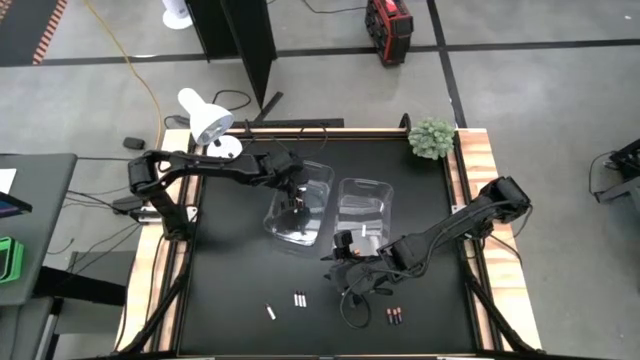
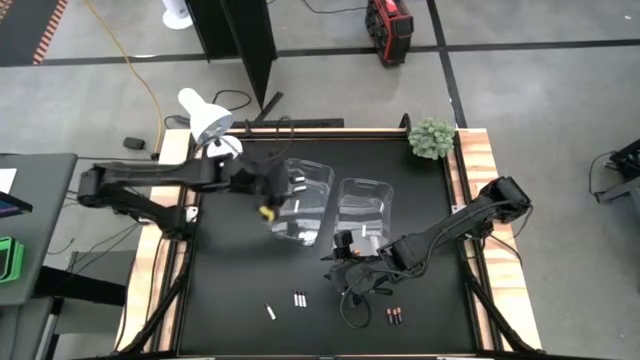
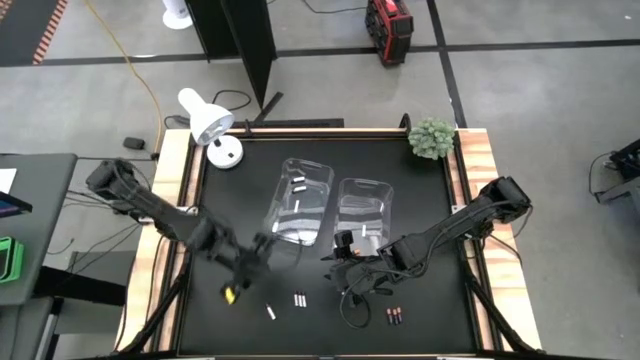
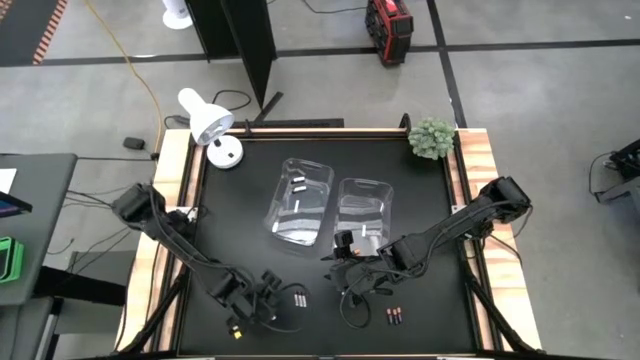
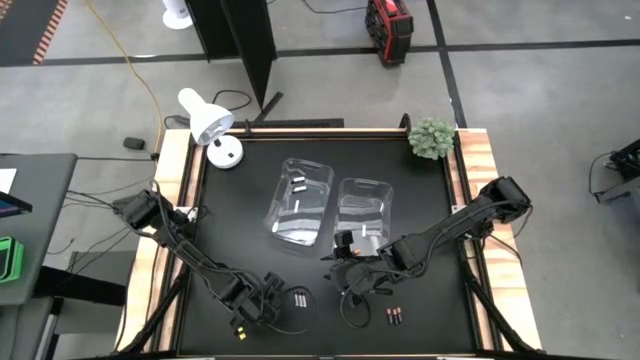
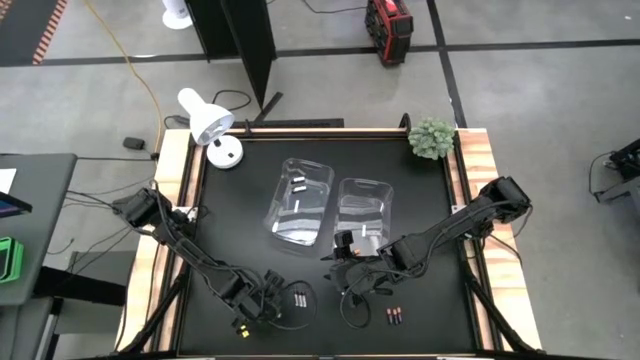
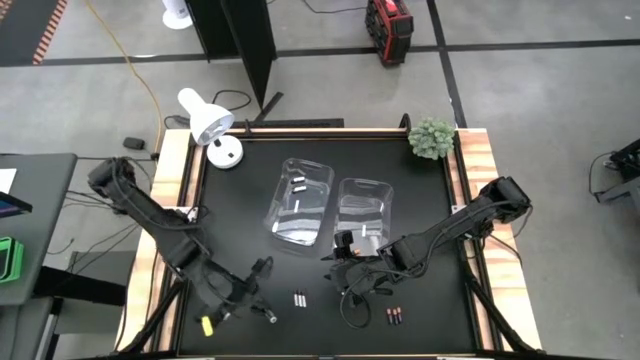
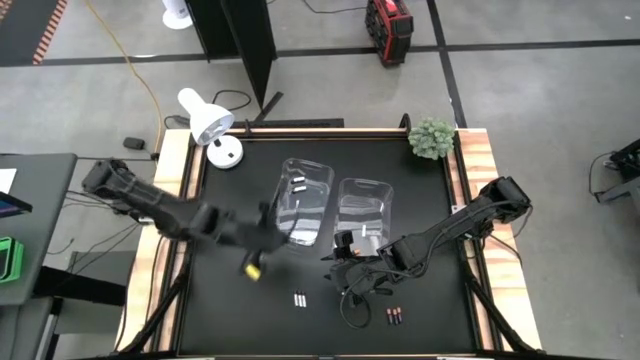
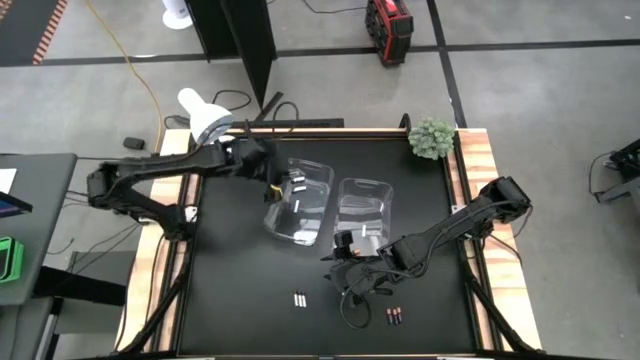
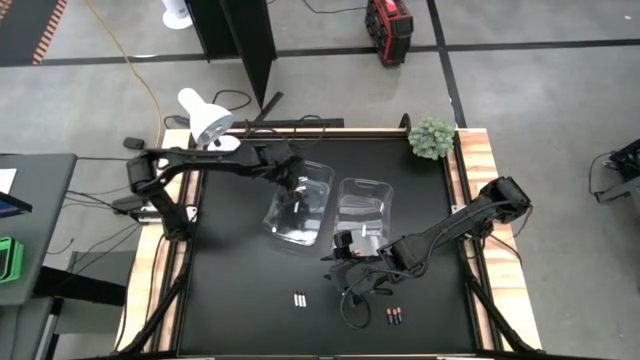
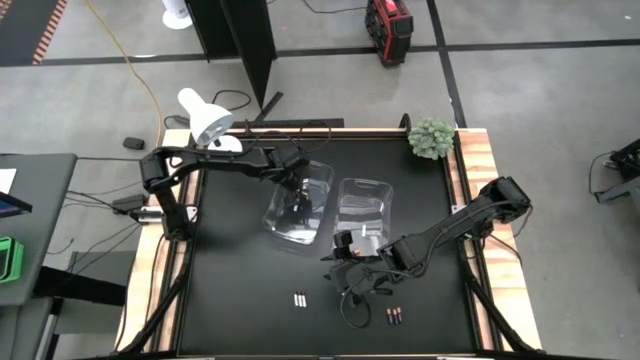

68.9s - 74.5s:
Task: Sort batteries
Put the white battery into the left transparent bin

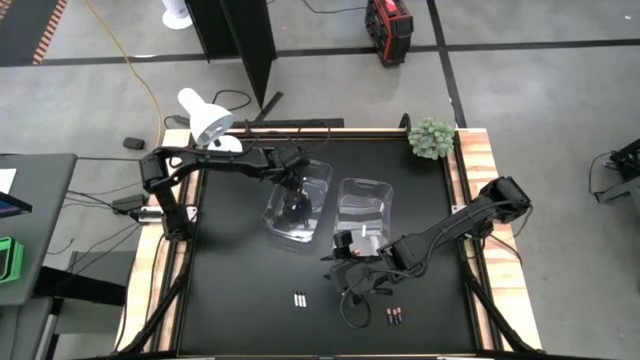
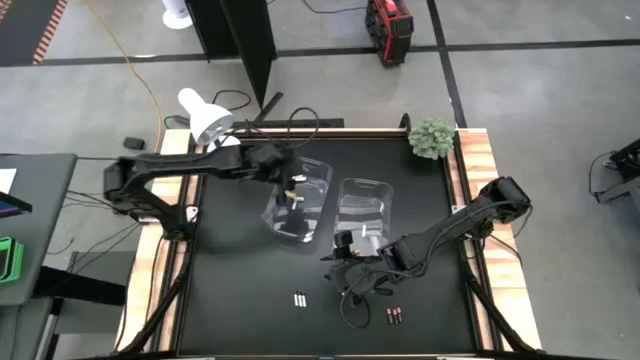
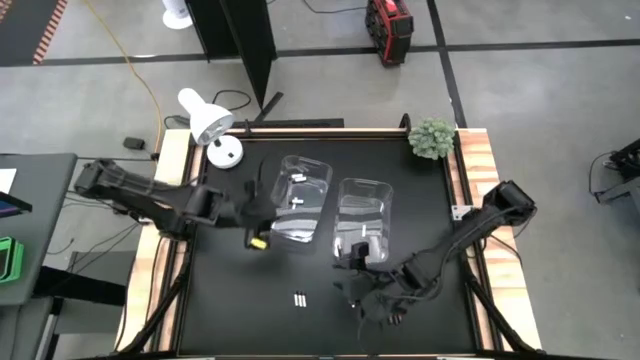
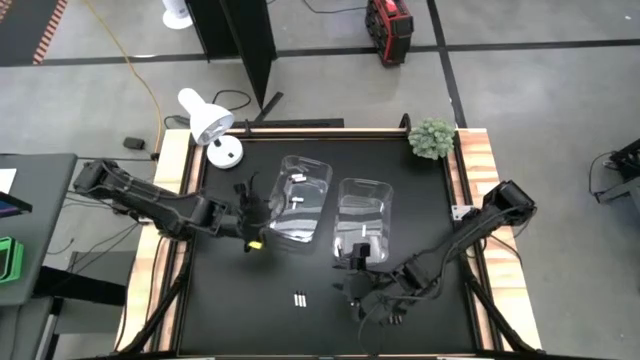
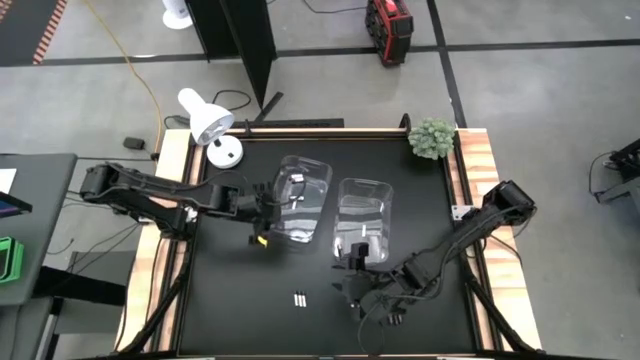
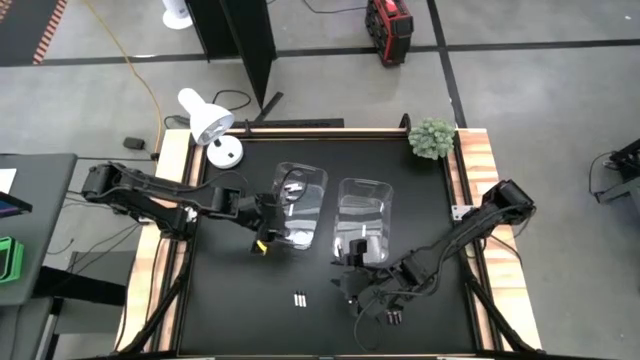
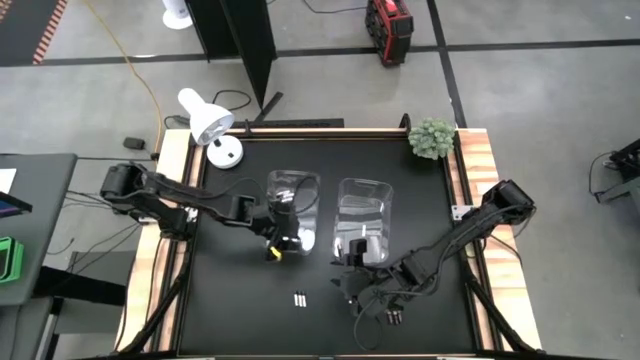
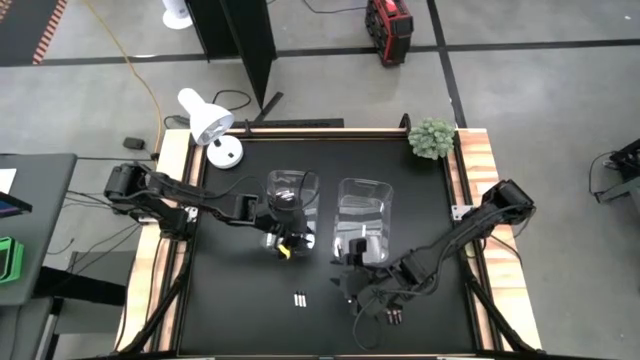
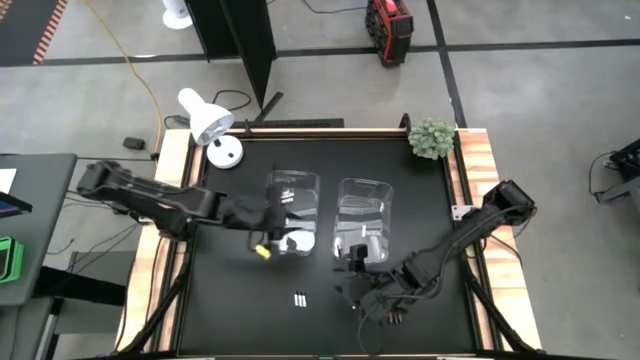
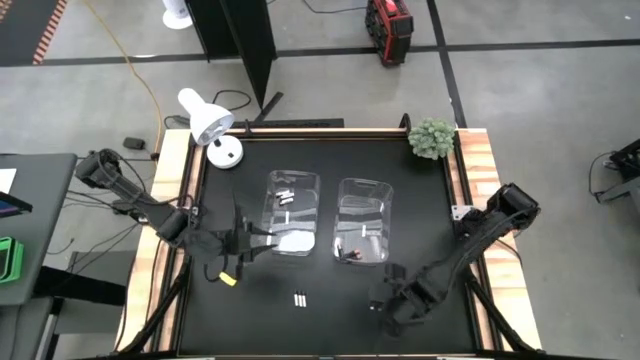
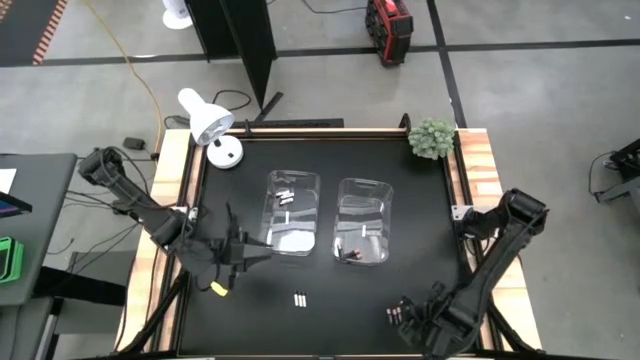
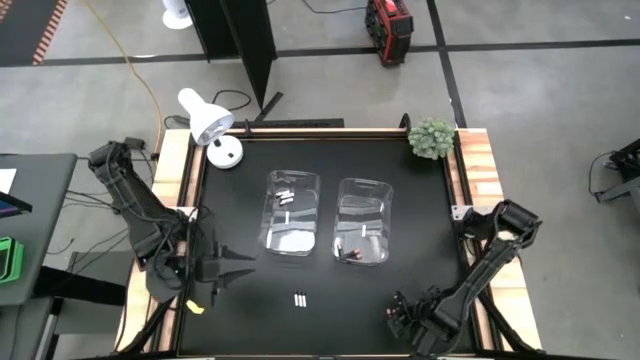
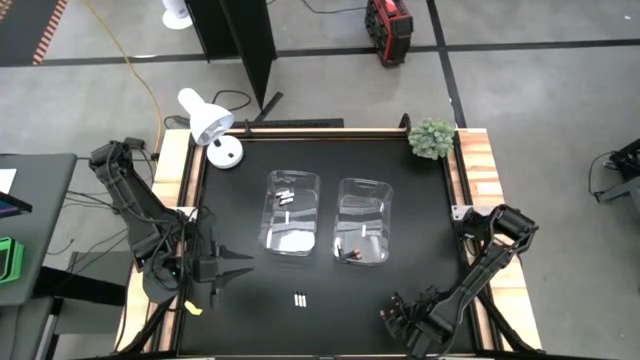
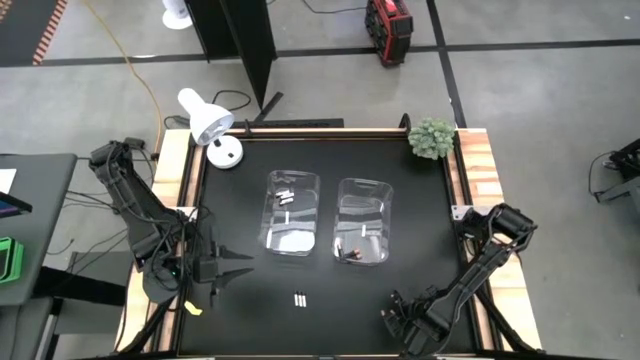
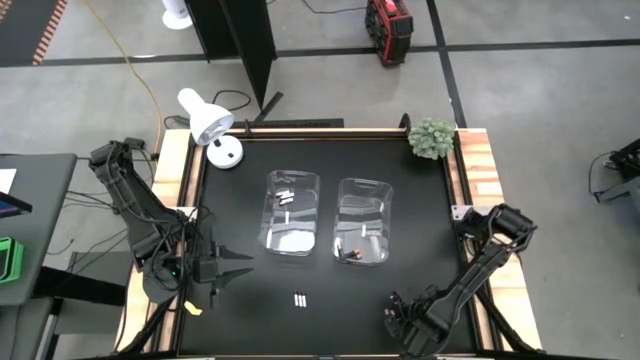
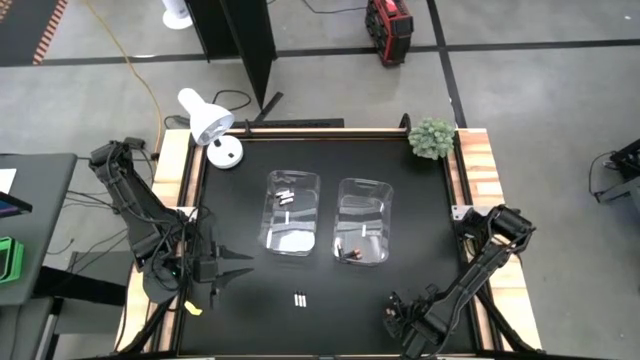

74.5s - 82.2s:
Put the black battery into the right transparent bin

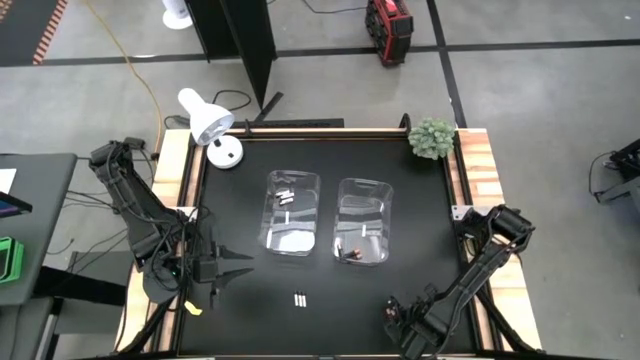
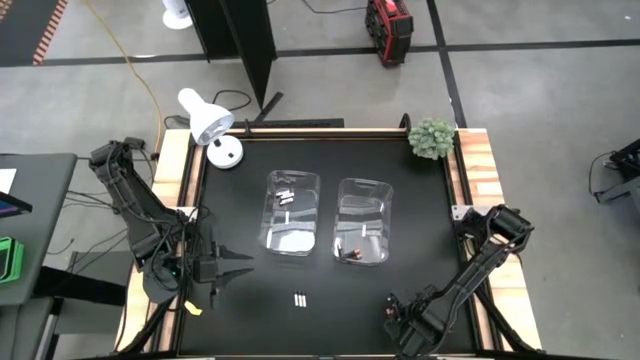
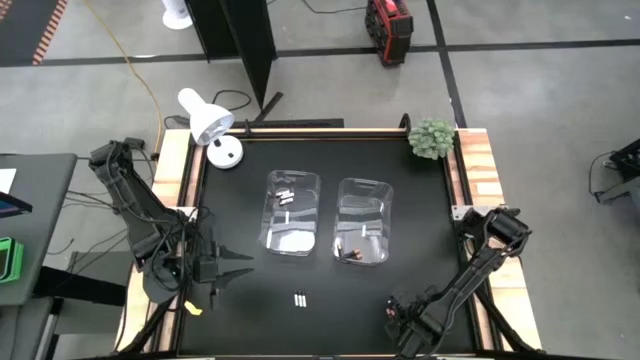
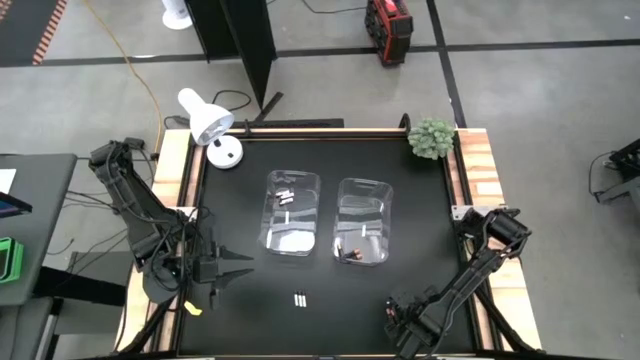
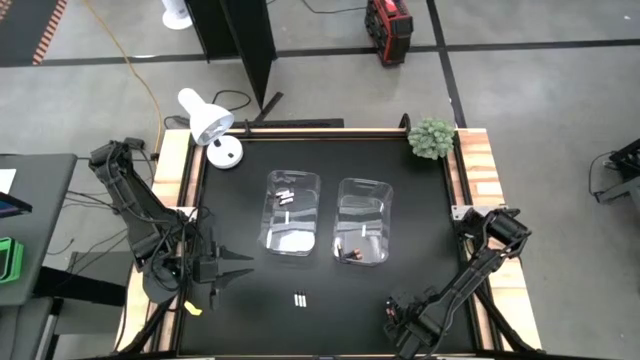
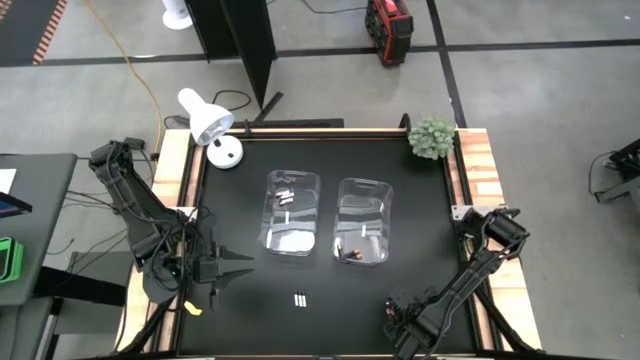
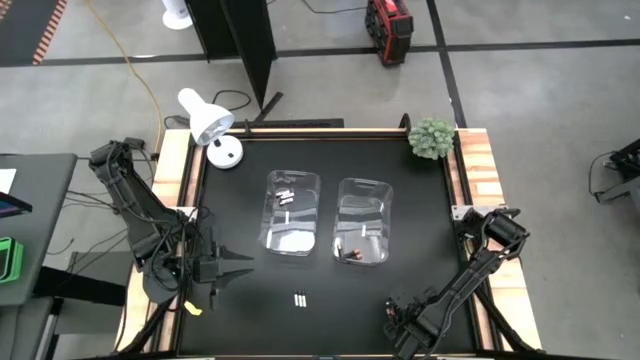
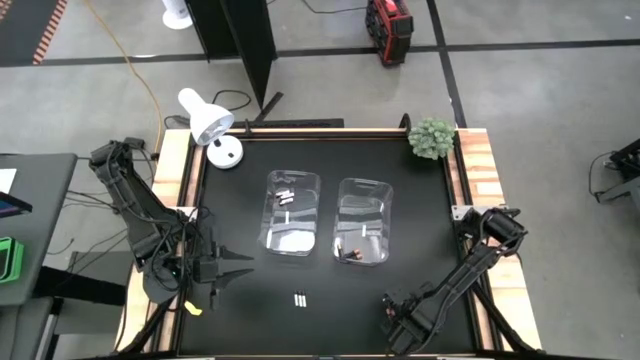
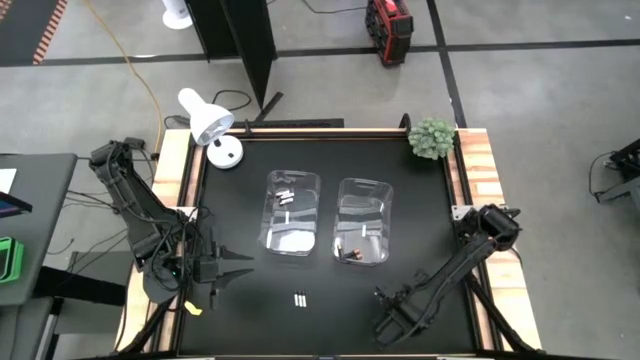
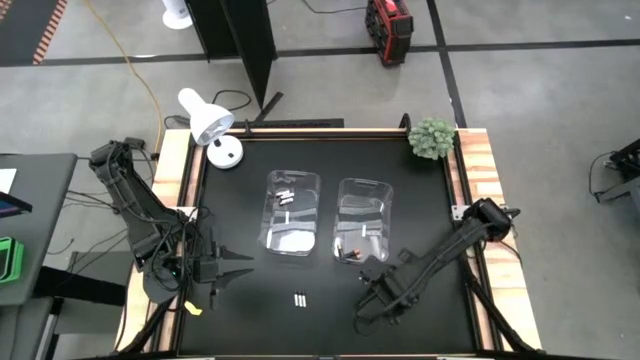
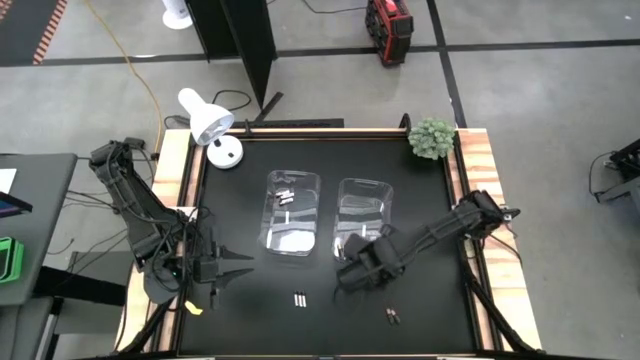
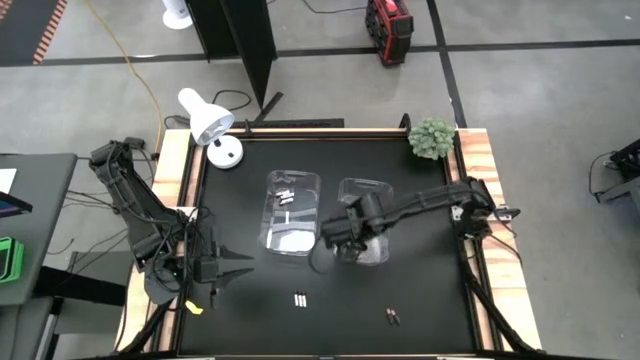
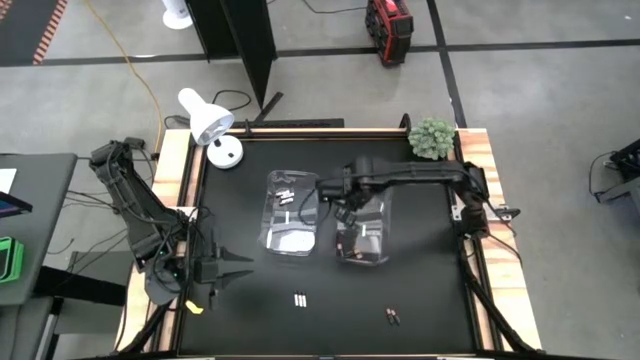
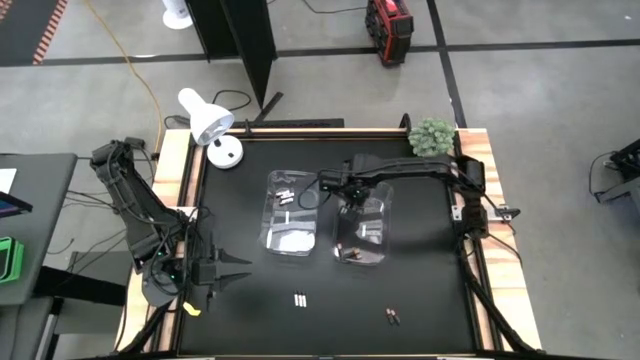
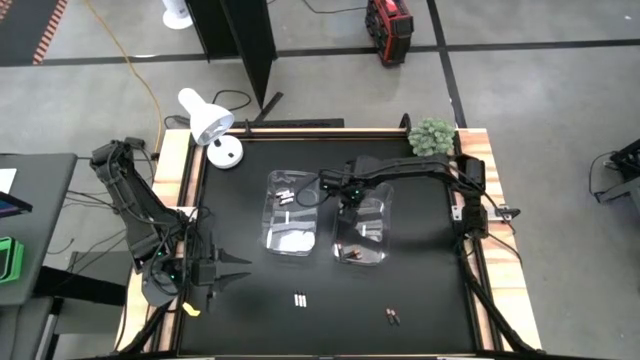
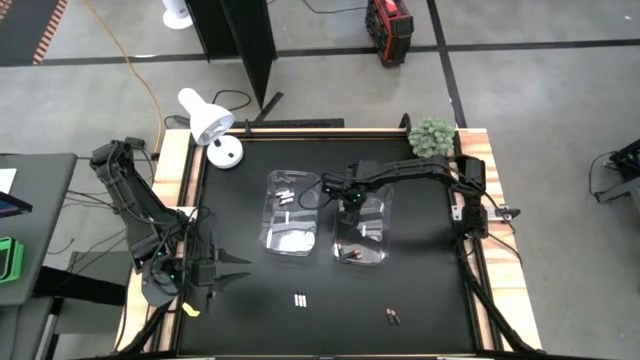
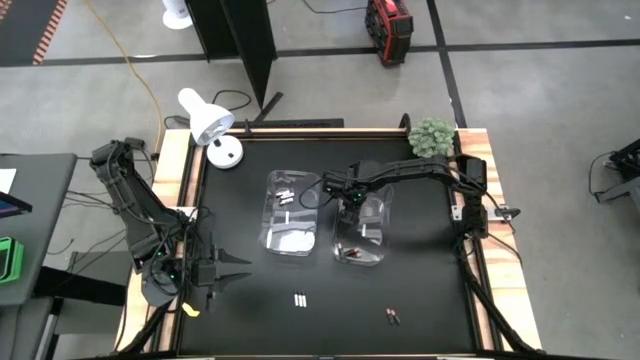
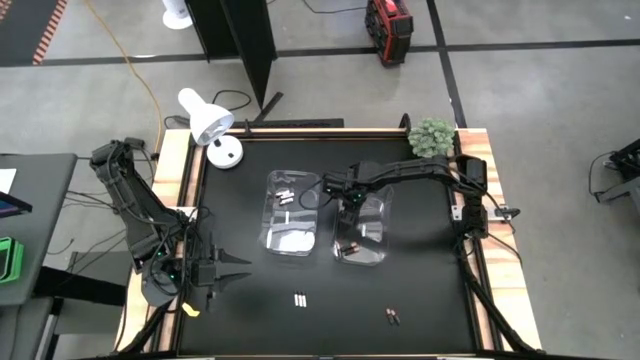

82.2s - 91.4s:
Put the black battery into the right transparent bin
